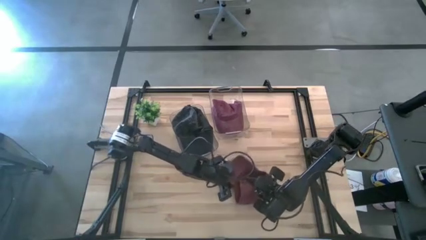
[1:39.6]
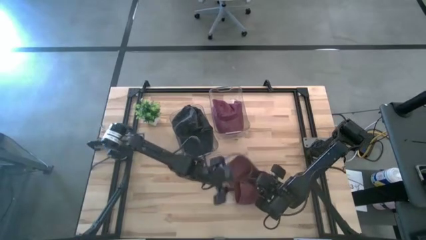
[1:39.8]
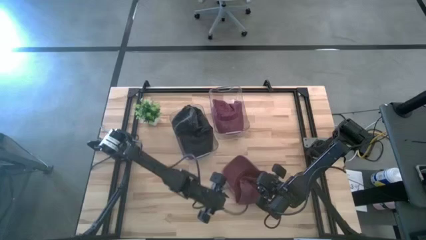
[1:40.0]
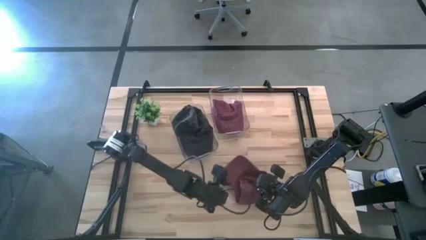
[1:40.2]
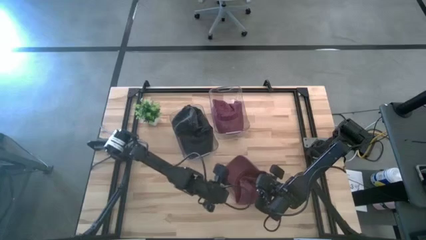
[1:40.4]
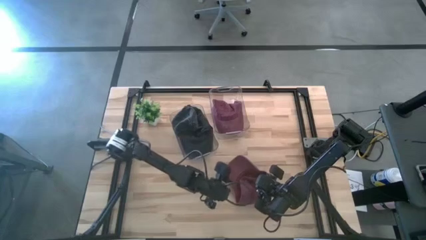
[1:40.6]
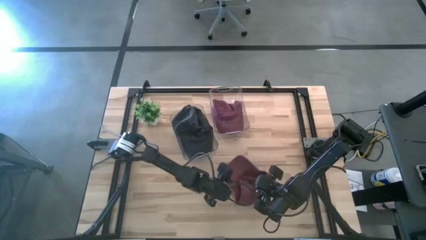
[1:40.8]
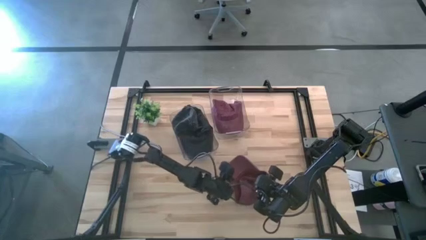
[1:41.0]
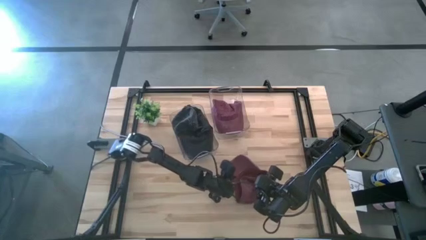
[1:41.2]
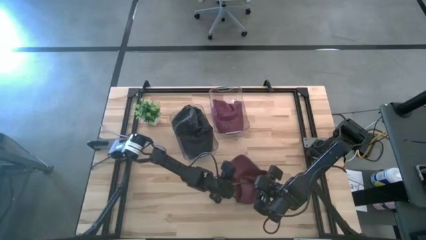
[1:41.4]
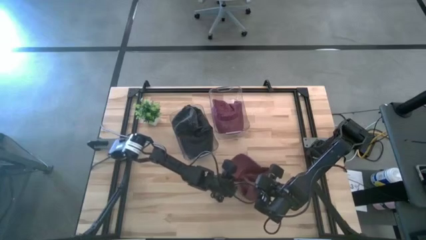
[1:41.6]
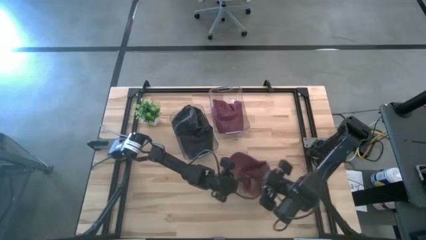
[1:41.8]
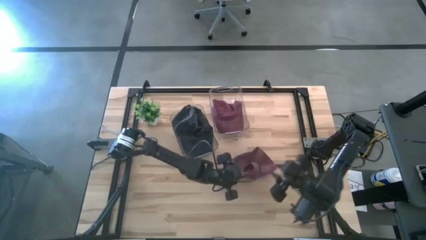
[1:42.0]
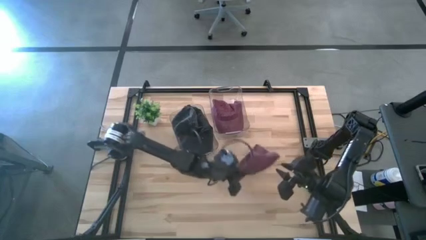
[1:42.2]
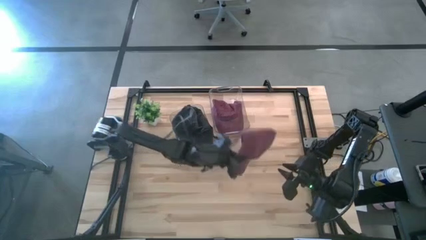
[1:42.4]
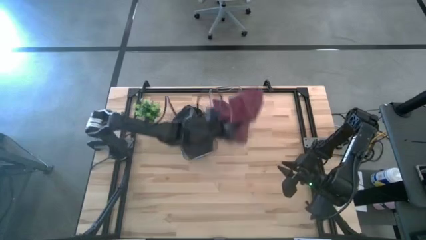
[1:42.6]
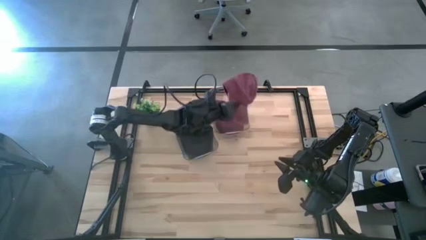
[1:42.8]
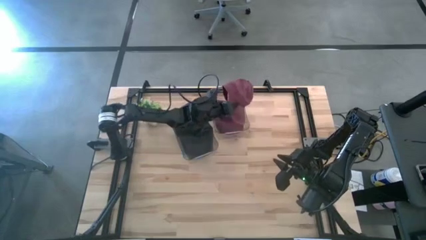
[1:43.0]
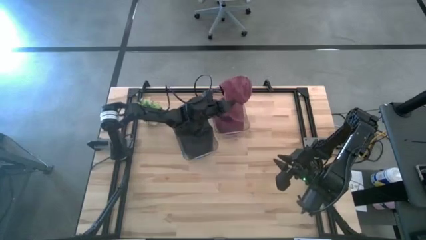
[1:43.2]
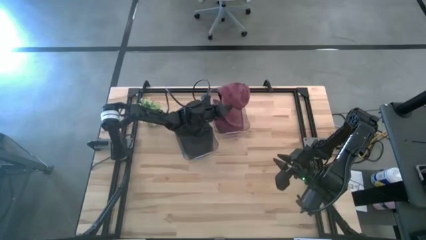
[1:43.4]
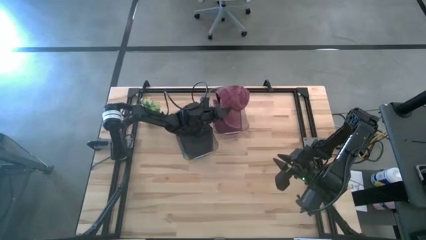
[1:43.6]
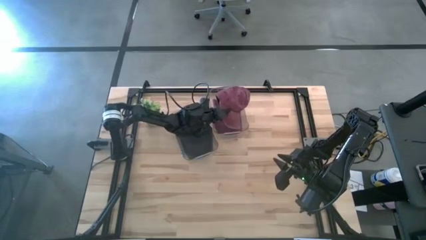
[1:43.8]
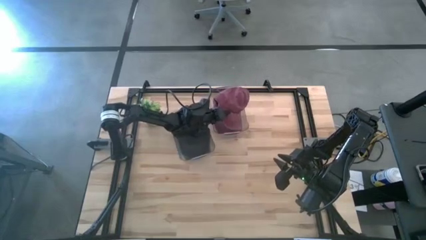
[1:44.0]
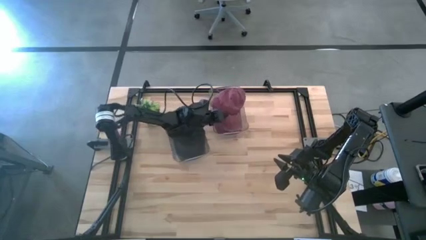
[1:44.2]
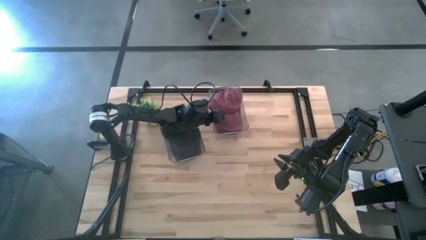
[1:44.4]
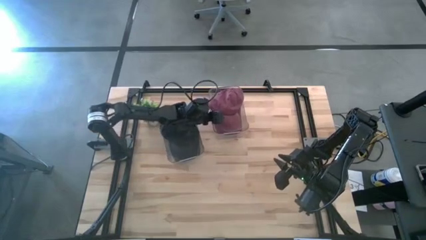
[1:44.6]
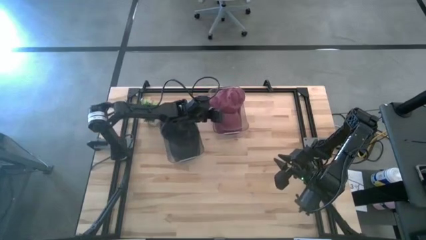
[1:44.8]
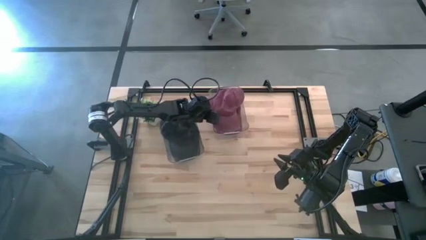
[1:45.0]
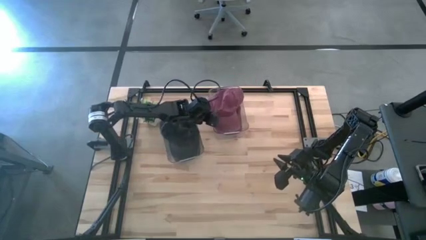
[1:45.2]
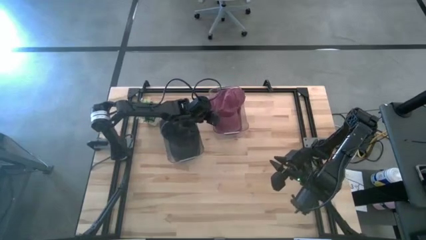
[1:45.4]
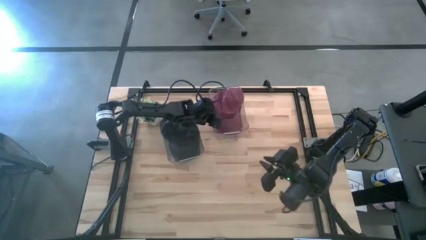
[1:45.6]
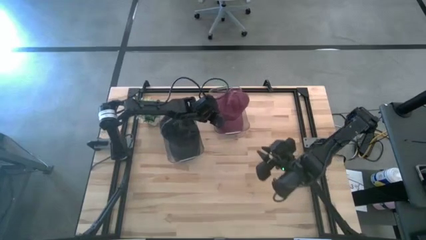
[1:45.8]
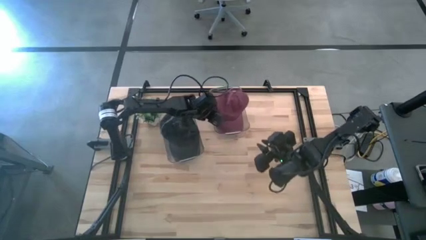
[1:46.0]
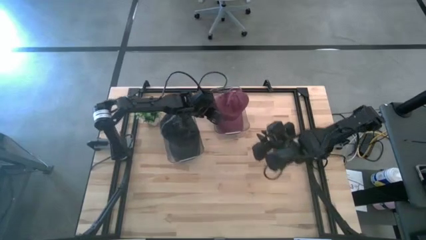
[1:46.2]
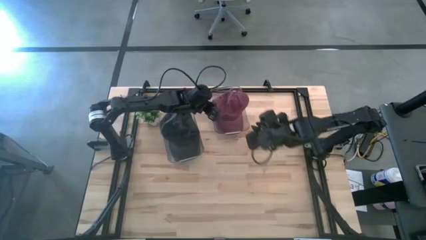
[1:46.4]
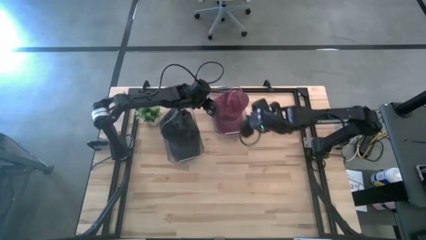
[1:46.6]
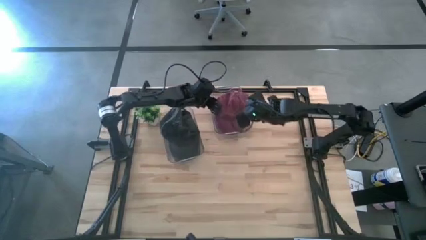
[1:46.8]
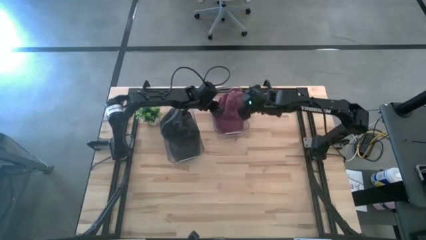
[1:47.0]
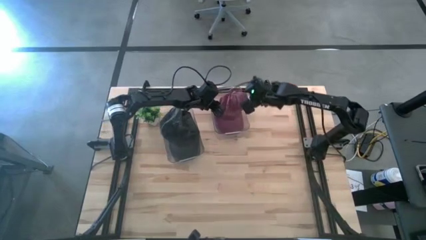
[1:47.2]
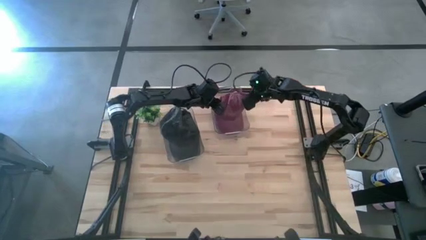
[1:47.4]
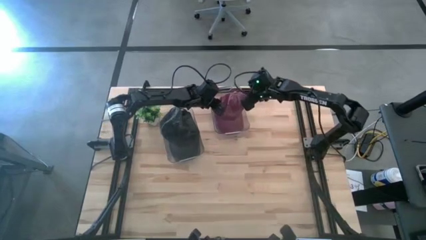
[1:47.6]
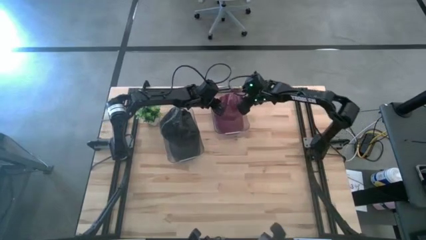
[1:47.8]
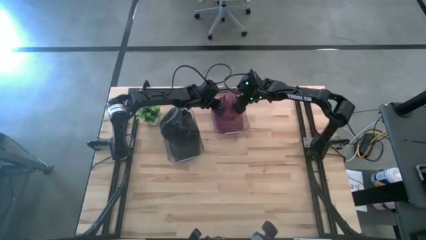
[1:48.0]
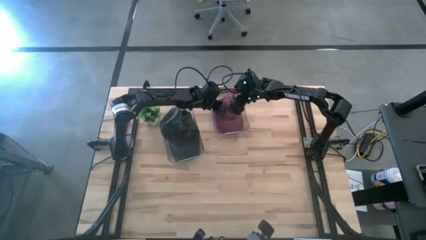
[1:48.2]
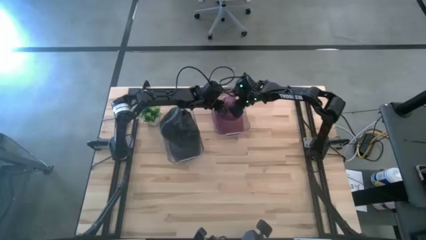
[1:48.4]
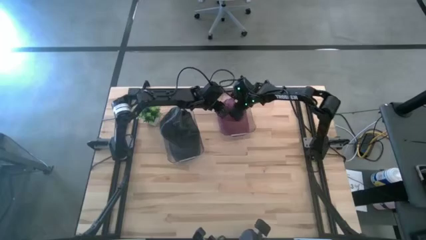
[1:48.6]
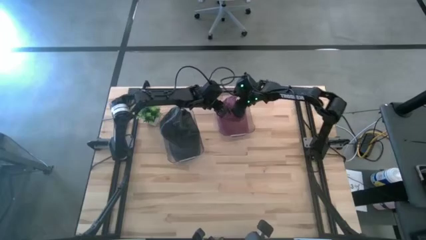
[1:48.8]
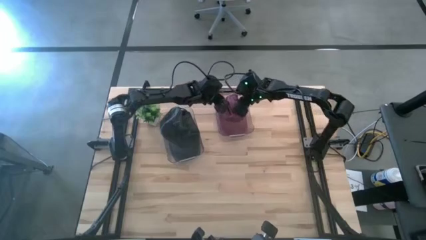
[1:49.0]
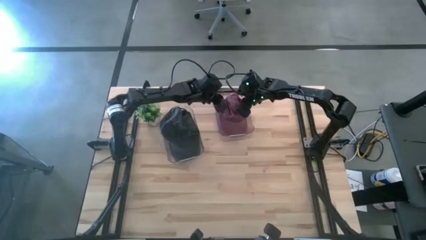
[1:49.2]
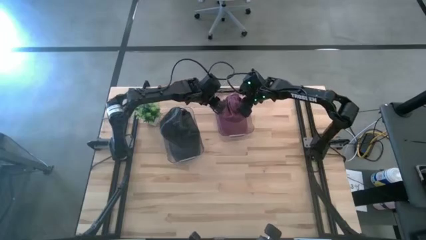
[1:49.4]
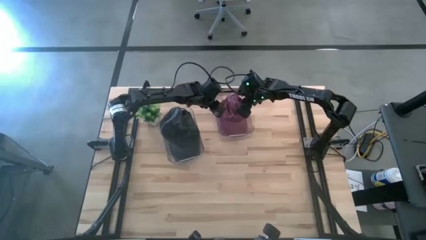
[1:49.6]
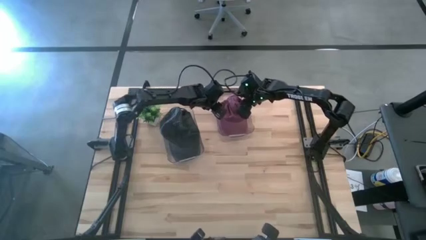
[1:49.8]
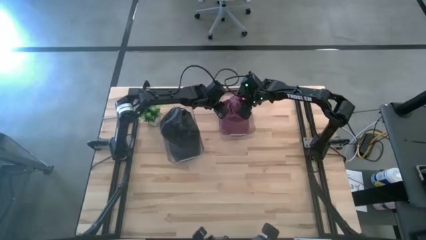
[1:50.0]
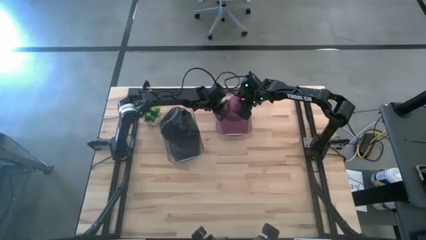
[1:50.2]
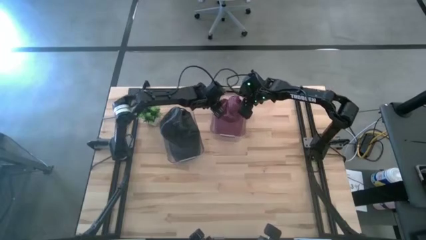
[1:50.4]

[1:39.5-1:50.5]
Task: Pick & Place hat
Put the red cap into the right transparent bin

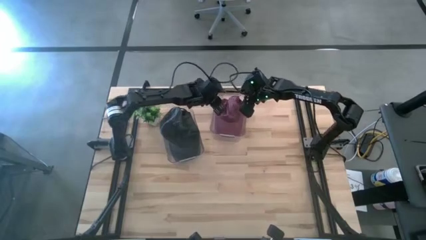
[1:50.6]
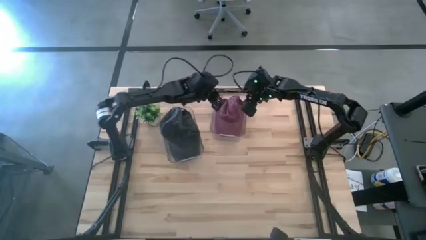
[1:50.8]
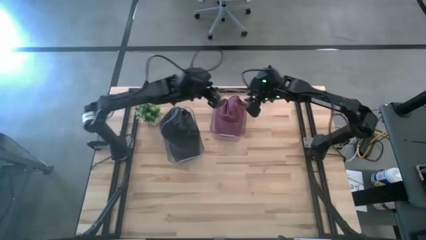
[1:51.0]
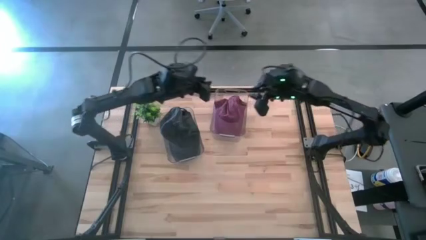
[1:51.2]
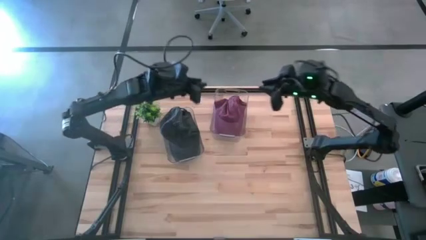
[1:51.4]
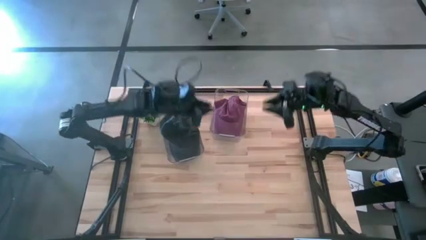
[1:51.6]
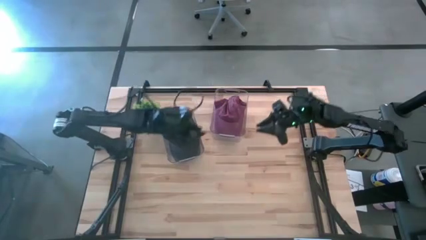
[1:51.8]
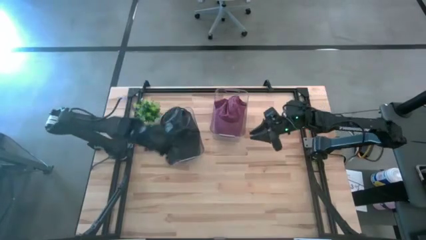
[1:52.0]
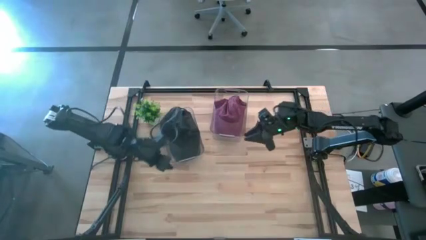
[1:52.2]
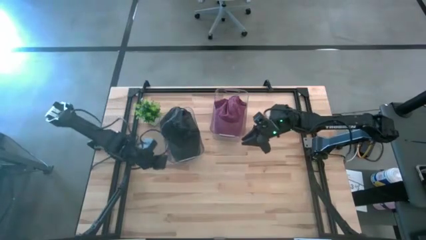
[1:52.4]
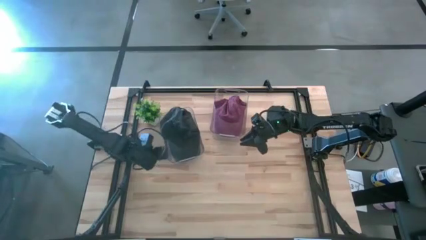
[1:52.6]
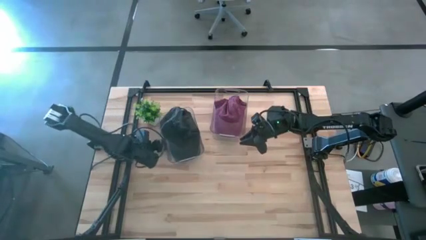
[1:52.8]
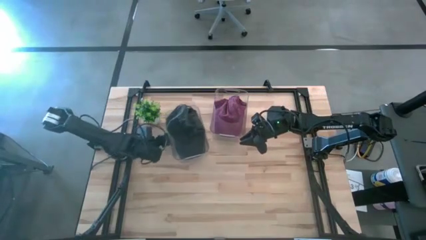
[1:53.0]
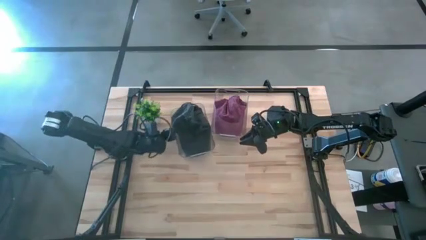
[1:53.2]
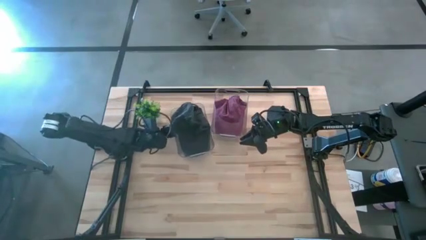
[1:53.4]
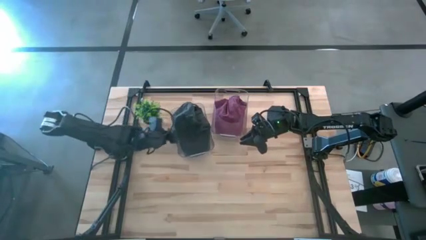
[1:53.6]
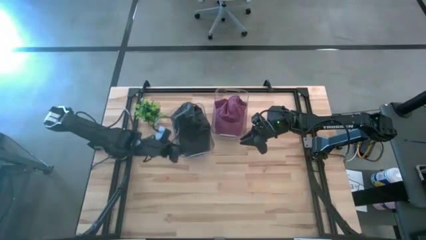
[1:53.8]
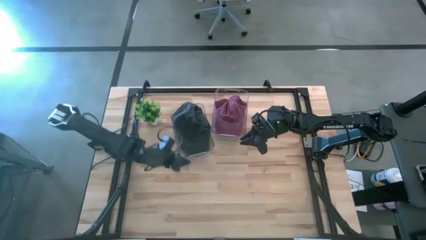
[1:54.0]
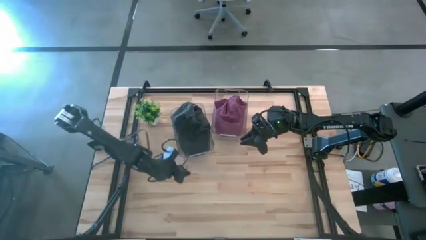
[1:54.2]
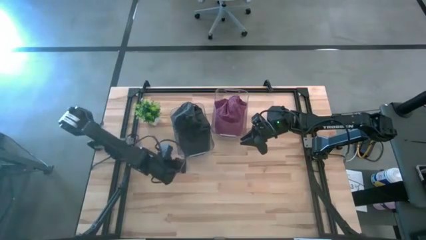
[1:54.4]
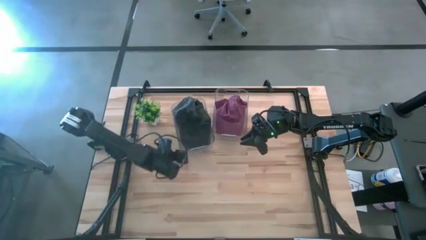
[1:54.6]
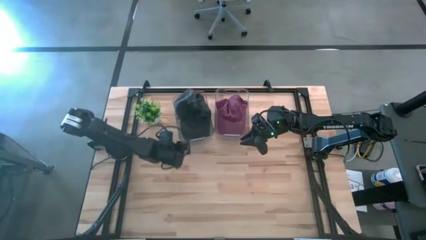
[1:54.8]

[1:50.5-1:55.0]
Move the left transparent bin to the top

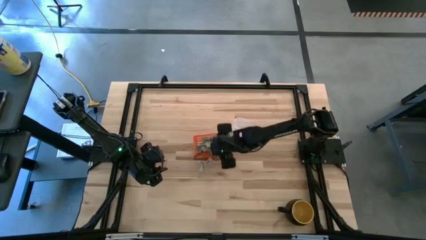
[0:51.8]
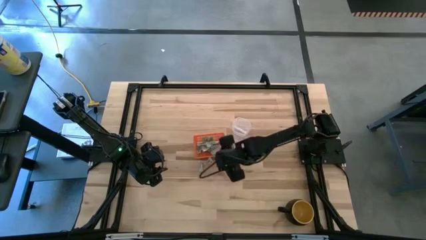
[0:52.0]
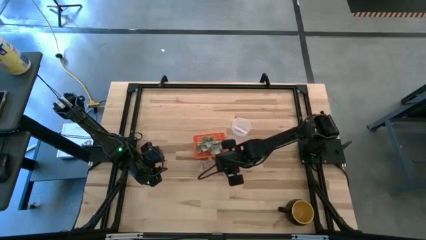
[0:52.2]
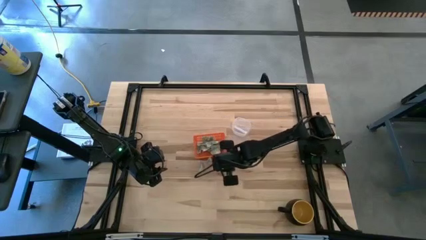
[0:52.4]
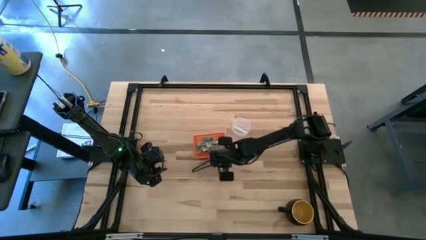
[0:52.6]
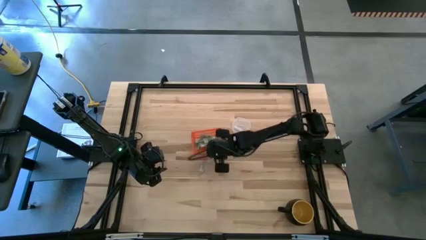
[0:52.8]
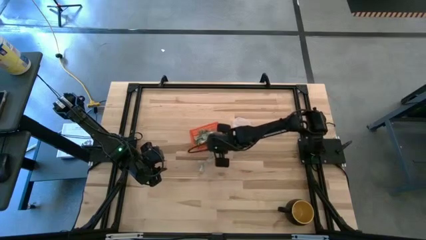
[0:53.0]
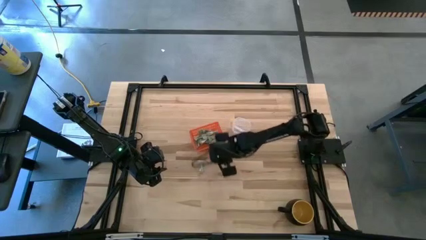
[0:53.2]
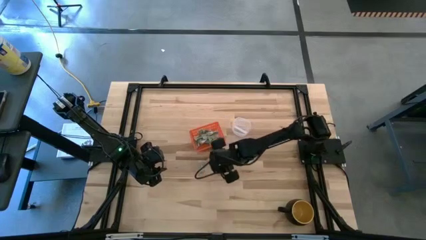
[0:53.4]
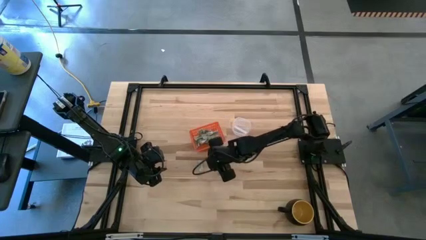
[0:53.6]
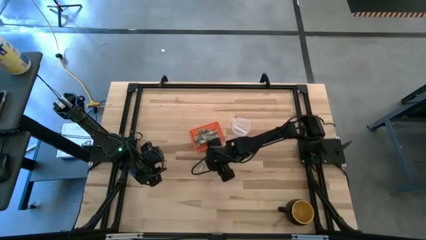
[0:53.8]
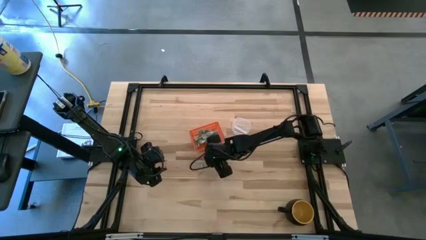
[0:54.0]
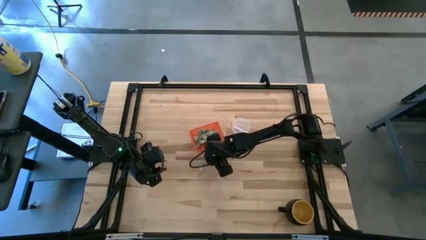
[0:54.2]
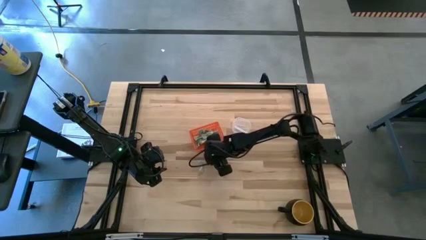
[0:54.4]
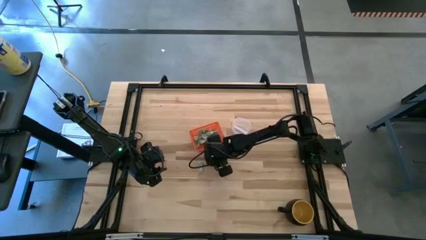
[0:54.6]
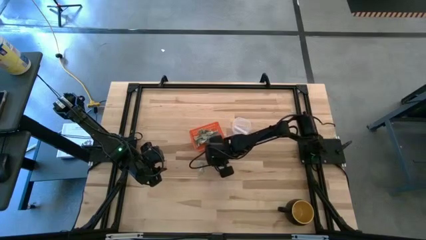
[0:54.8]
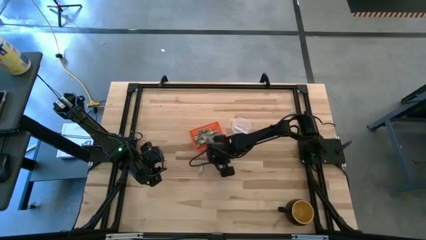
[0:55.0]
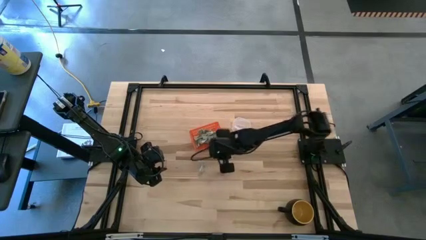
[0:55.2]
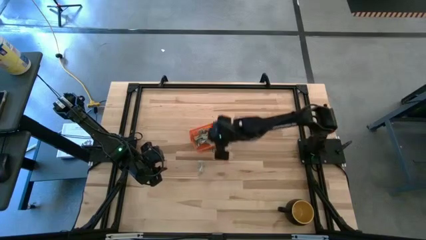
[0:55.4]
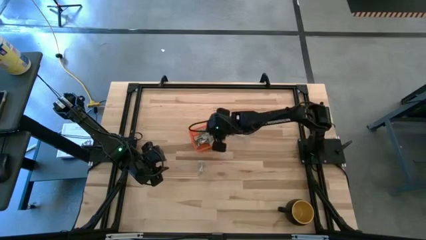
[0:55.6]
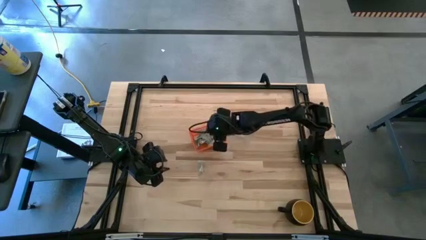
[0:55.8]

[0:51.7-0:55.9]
Task: Pick and place Stevia / Truvia into bins
Put the right stevia packet into the basket
